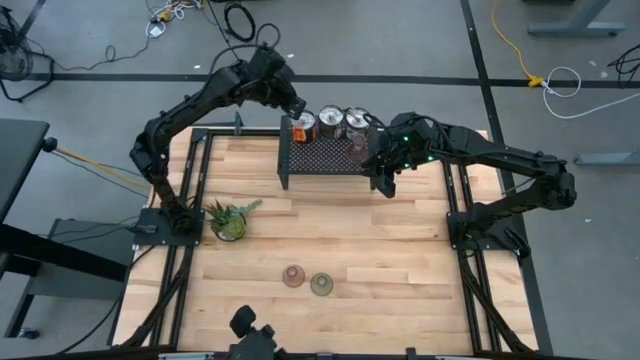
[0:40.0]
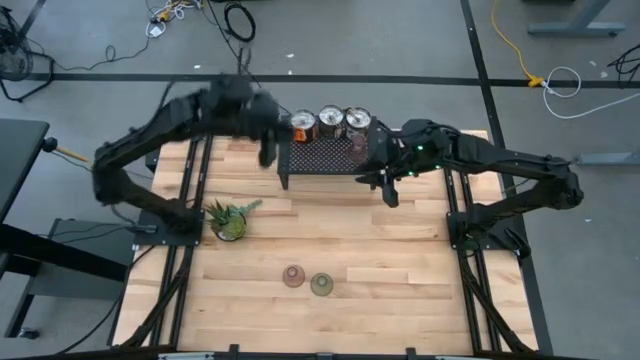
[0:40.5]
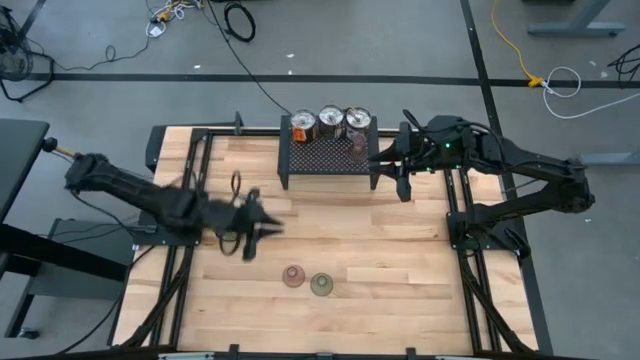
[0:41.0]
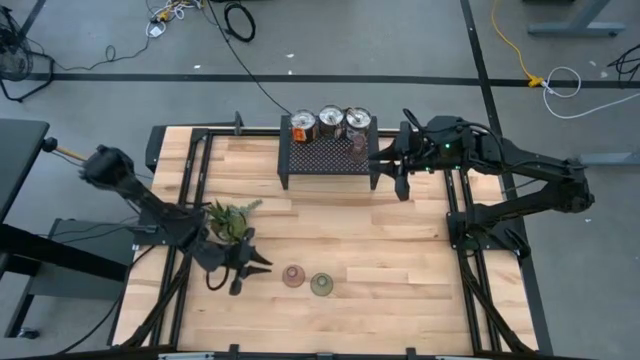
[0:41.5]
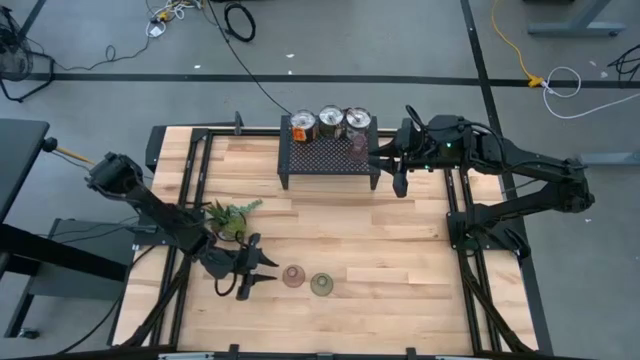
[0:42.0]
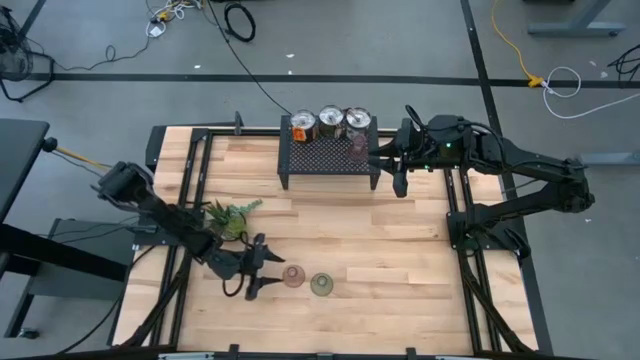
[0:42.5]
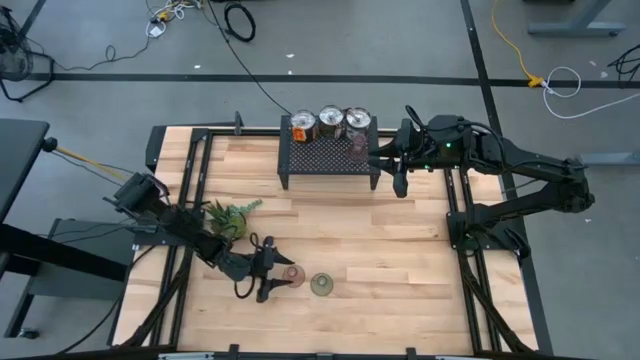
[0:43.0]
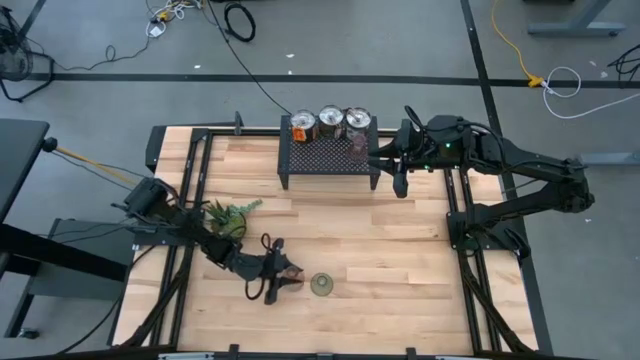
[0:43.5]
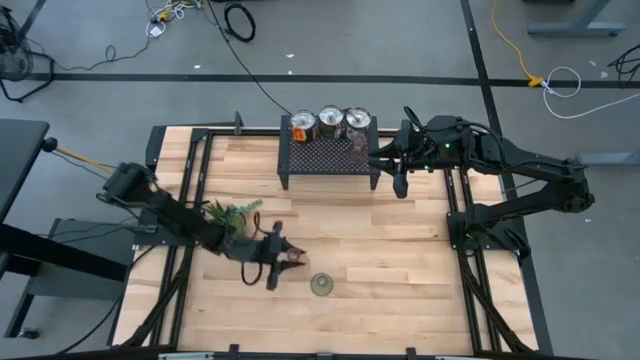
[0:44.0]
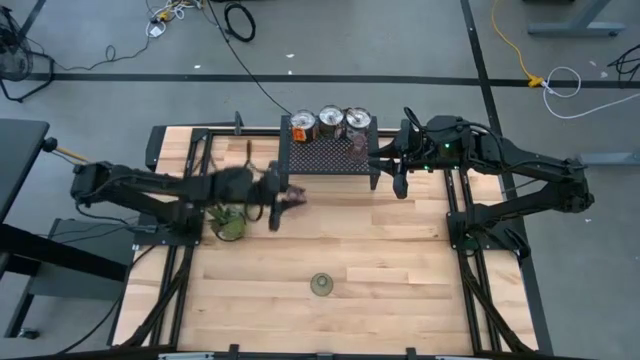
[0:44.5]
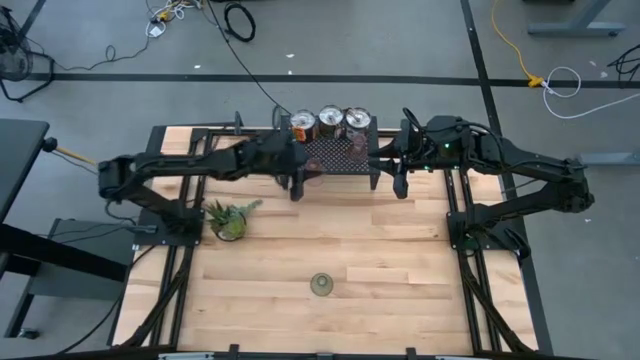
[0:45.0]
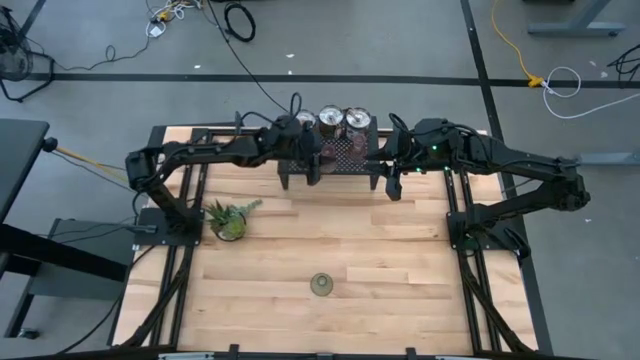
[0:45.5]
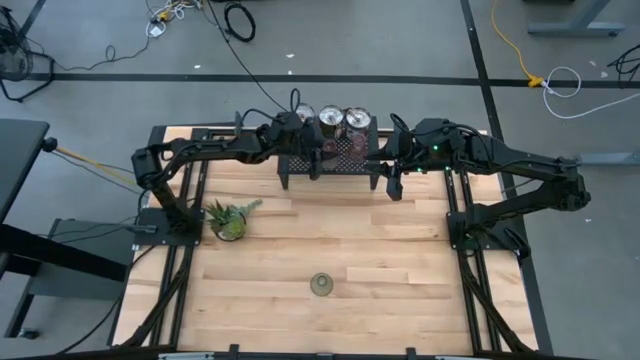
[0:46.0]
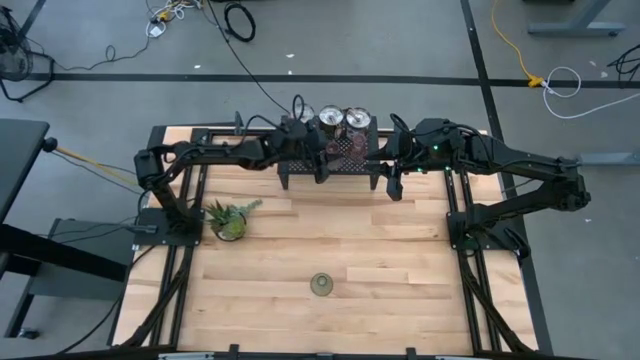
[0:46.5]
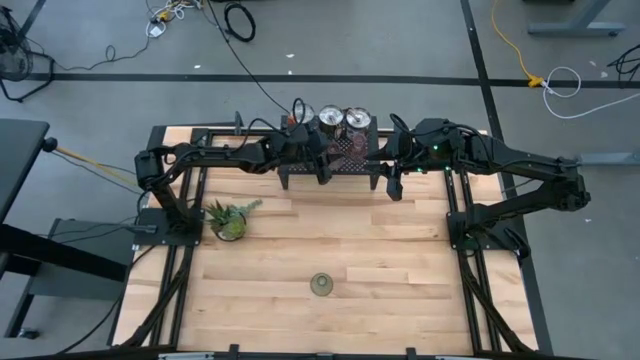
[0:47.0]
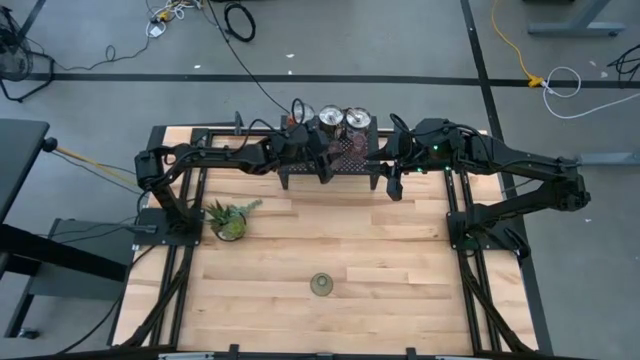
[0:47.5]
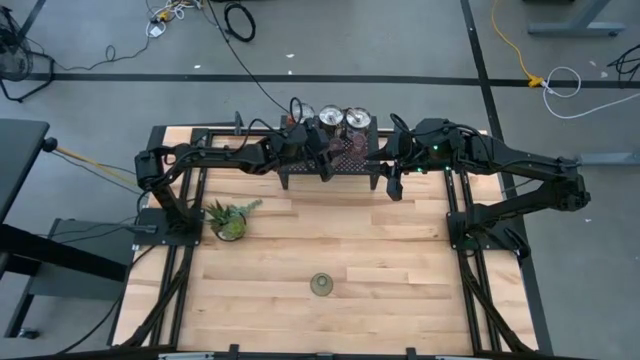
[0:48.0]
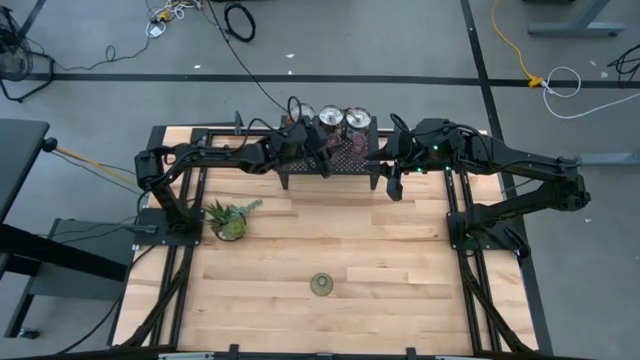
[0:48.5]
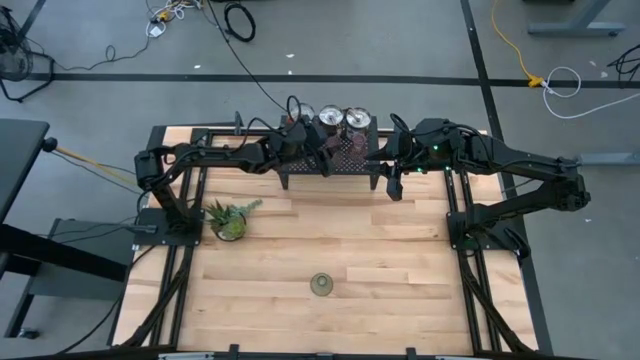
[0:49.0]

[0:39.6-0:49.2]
Task: Pick & Place candle stick holders
Put the pink glass candle holder on the shelf

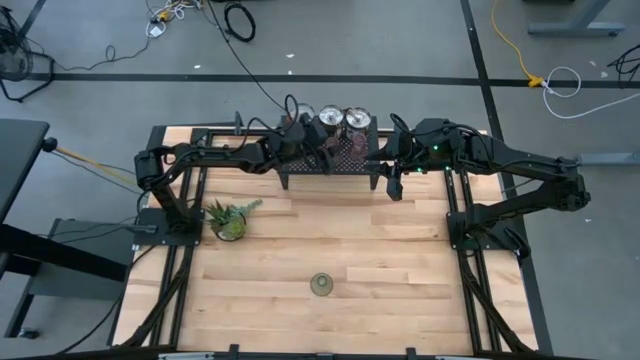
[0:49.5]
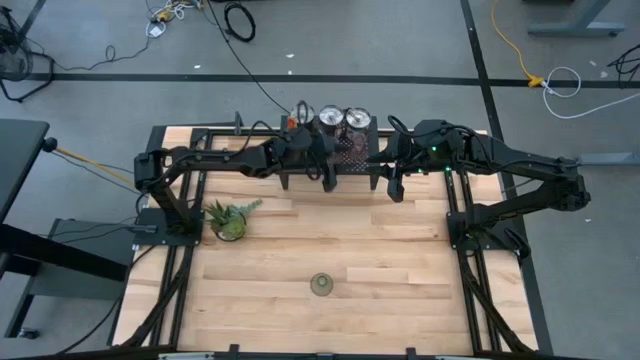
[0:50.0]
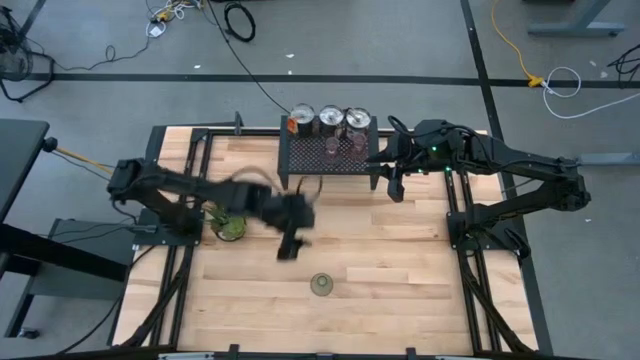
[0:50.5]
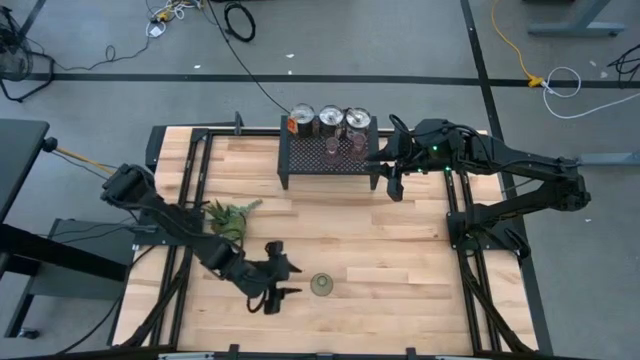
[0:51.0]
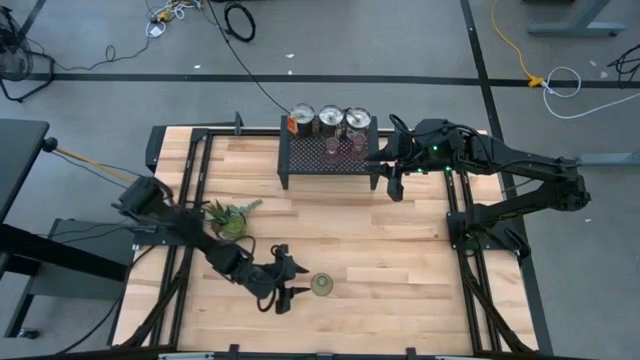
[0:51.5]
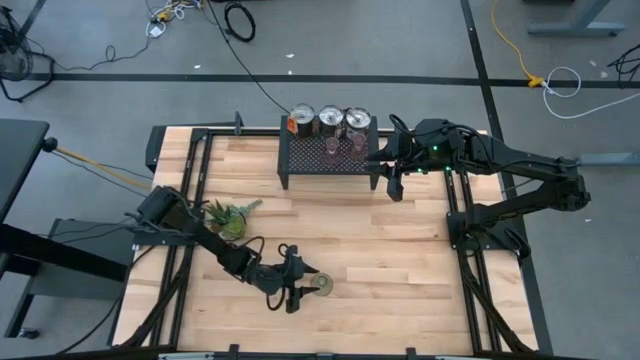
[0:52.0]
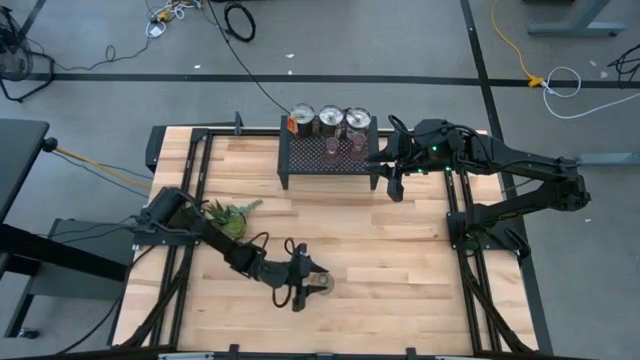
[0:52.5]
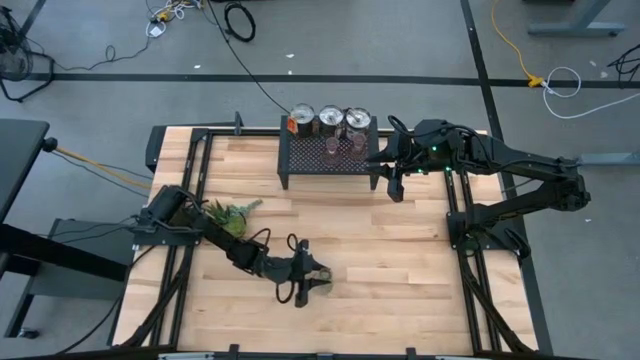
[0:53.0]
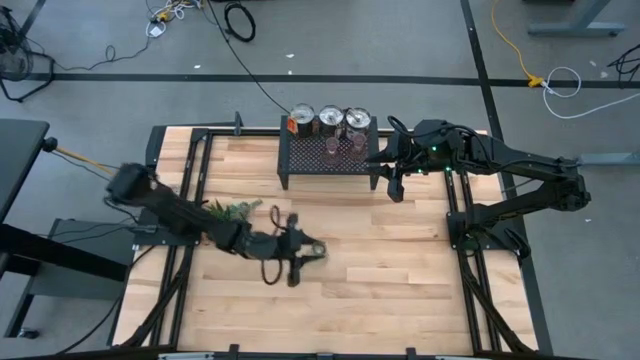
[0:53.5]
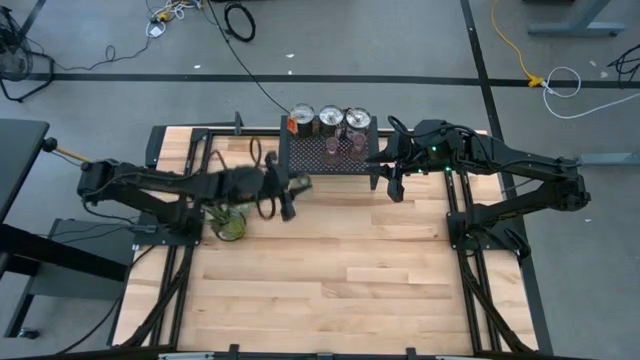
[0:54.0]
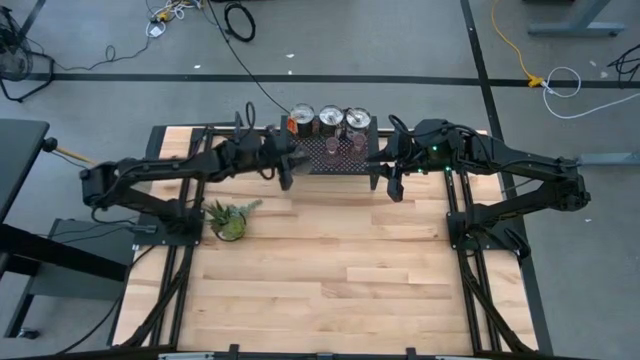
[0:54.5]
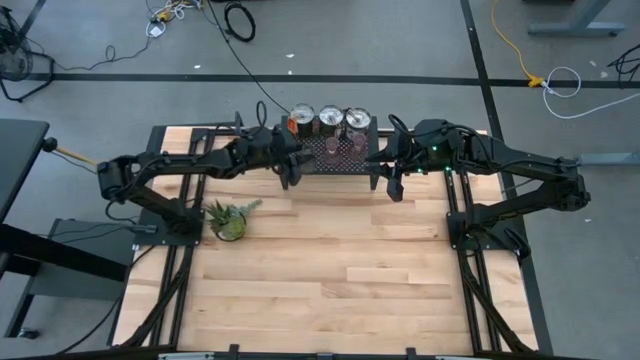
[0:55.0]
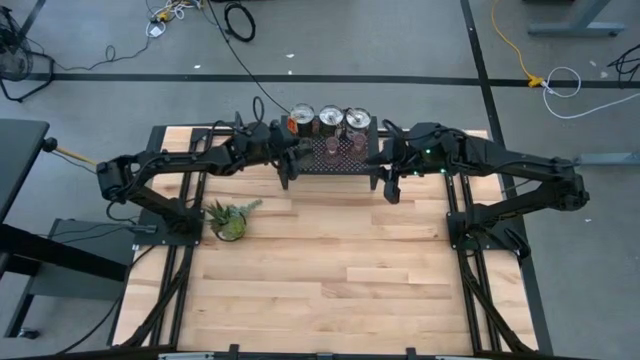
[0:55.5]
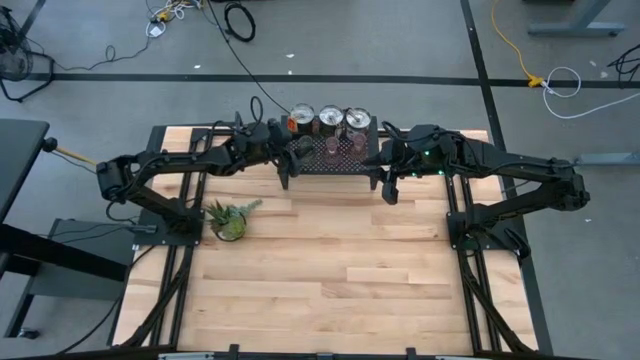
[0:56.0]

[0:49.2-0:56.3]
Put the green glass candle holder on the shelf

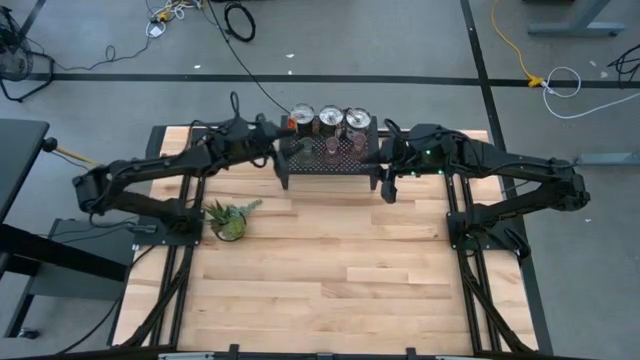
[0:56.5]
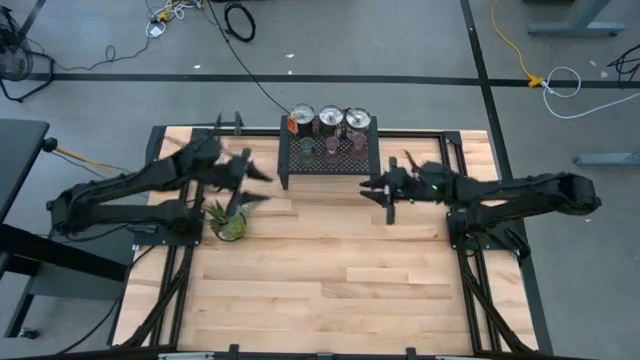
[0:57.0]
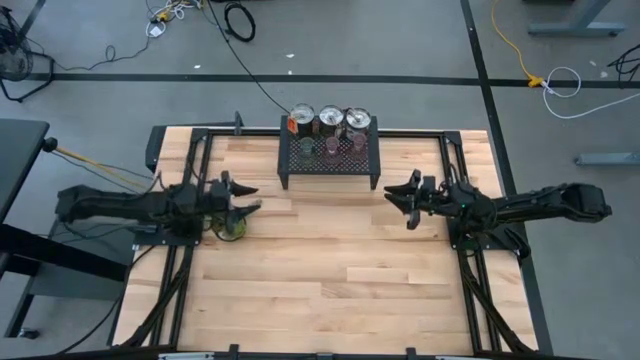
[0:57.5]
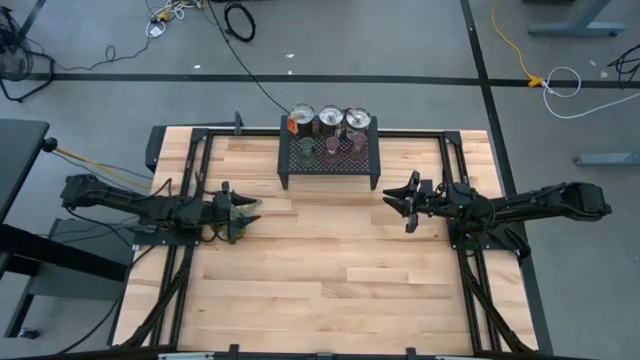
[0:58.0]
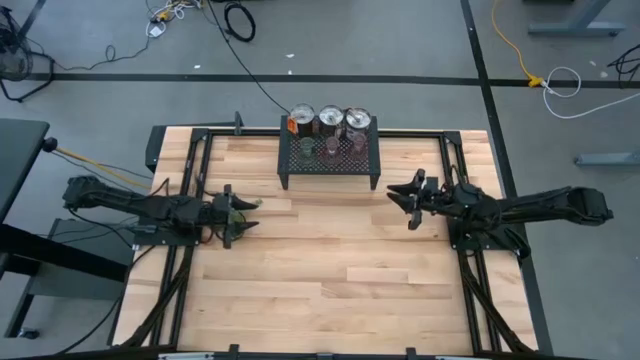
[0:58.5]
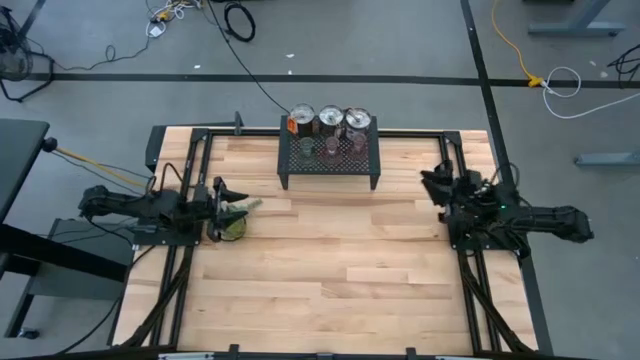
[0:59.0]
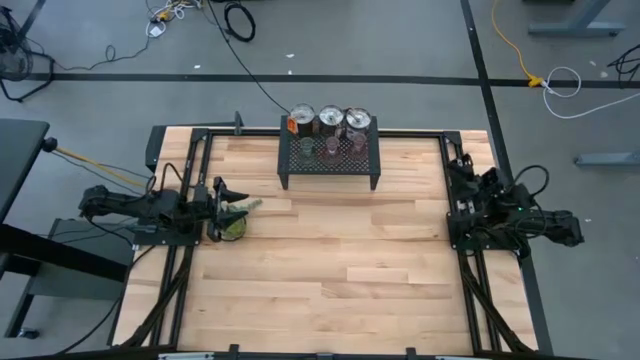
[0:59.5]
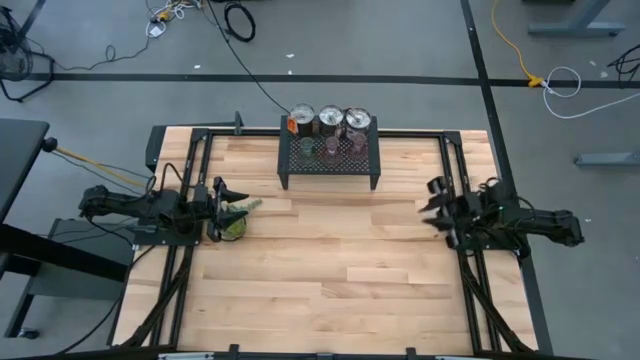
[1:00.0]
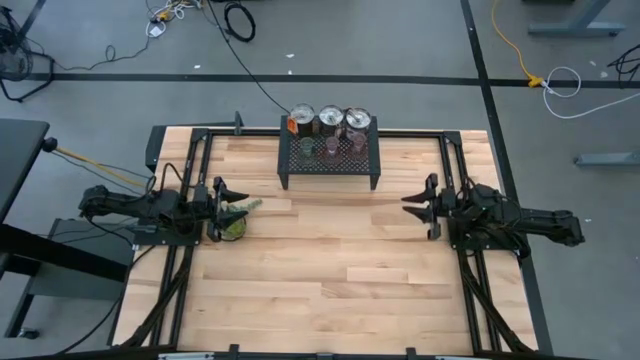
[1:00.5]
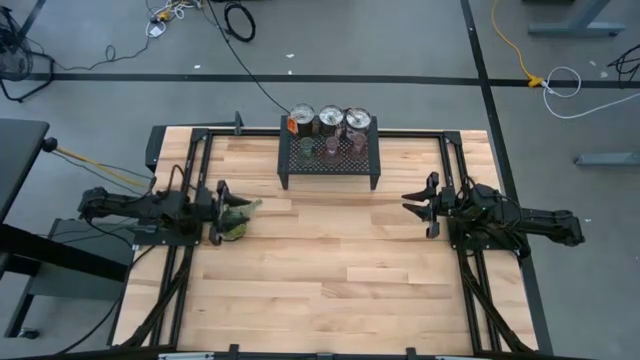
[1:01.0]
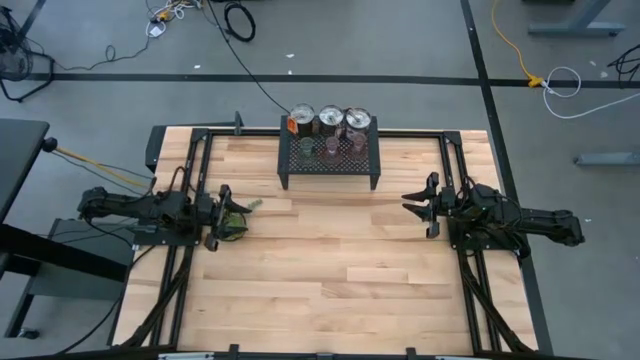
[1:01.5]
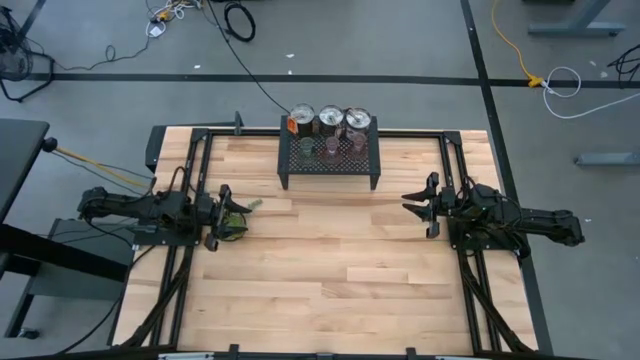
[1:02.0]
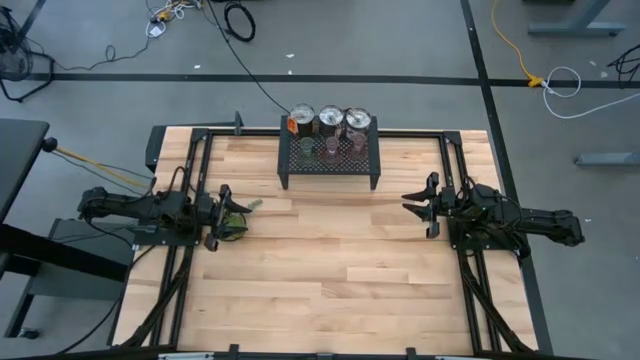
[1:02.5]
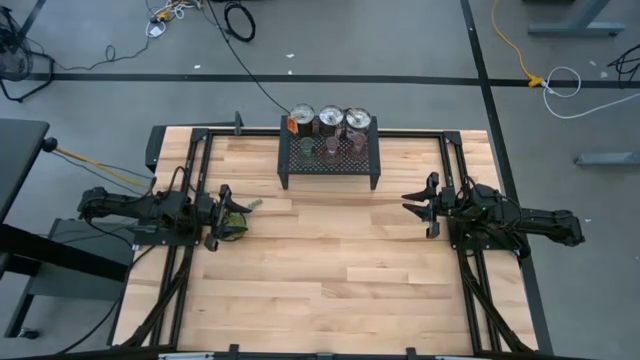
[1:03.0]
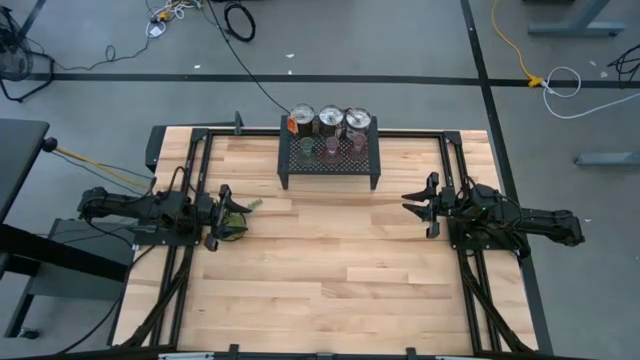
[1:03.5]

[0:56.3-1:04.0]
Return to Home Position
